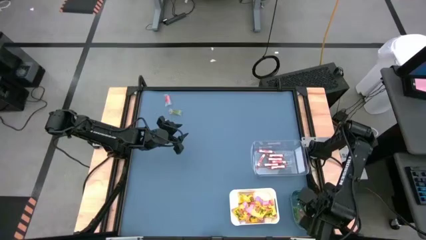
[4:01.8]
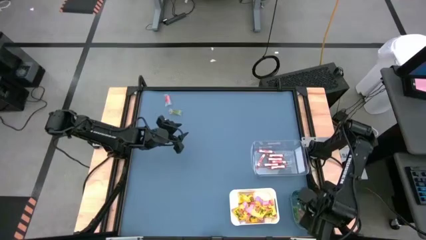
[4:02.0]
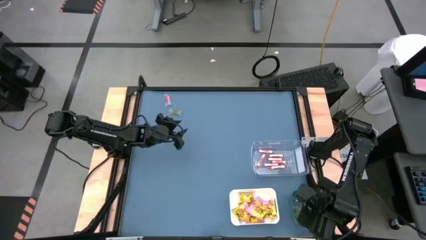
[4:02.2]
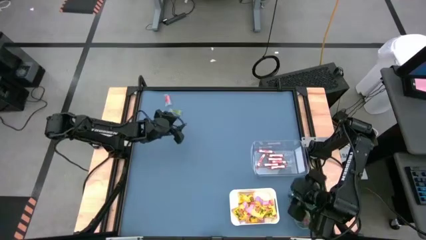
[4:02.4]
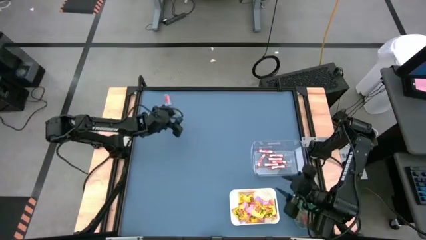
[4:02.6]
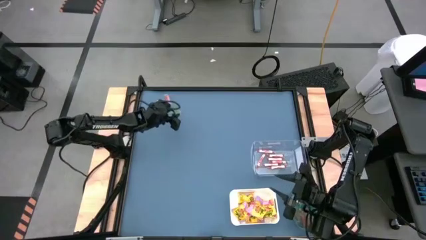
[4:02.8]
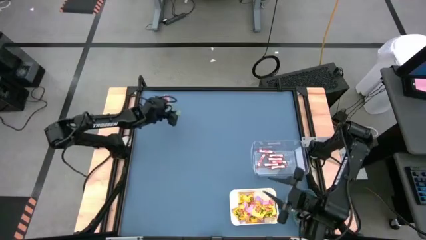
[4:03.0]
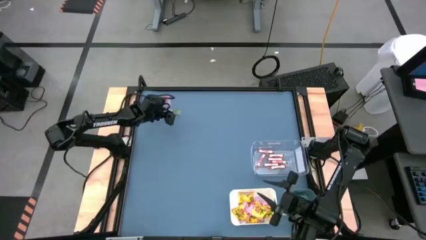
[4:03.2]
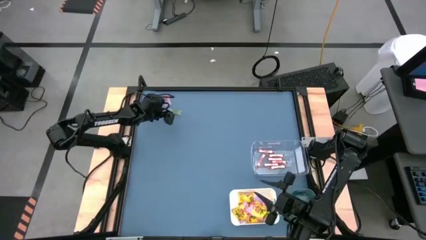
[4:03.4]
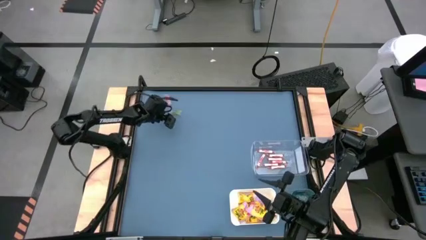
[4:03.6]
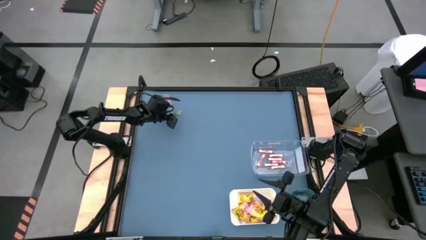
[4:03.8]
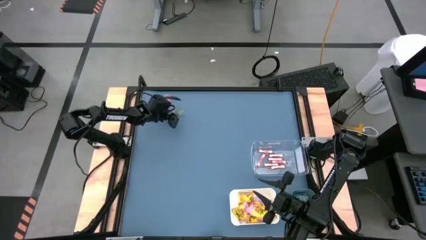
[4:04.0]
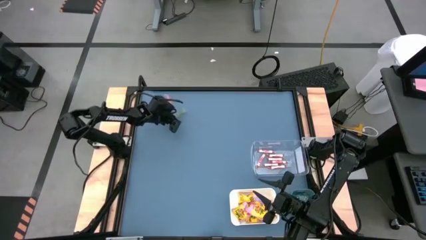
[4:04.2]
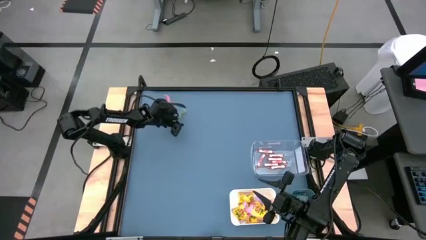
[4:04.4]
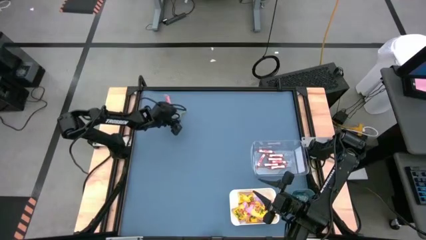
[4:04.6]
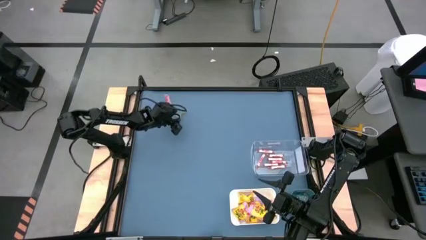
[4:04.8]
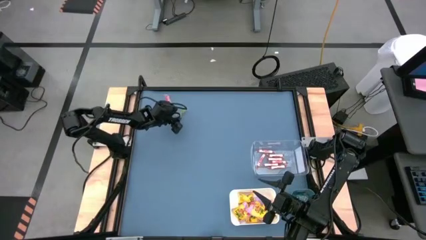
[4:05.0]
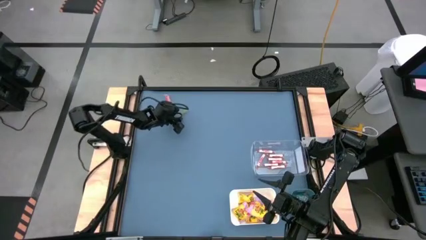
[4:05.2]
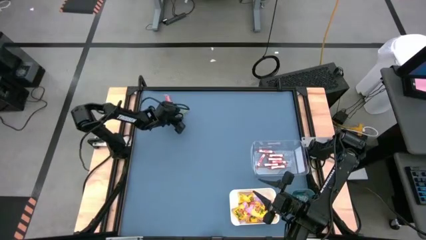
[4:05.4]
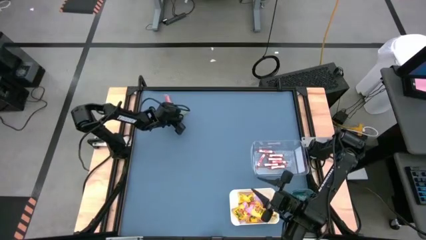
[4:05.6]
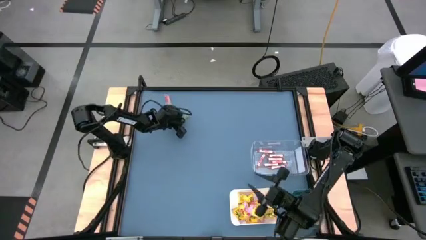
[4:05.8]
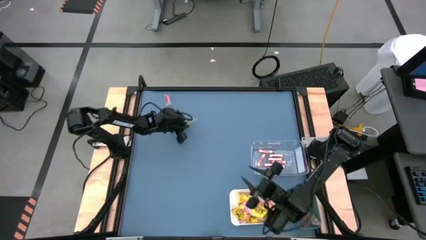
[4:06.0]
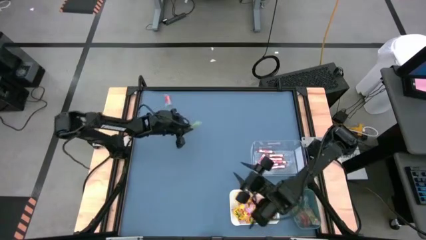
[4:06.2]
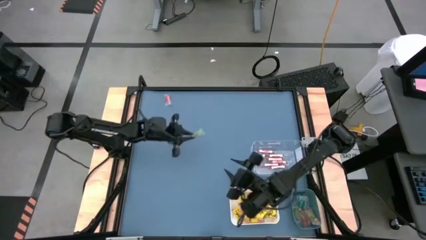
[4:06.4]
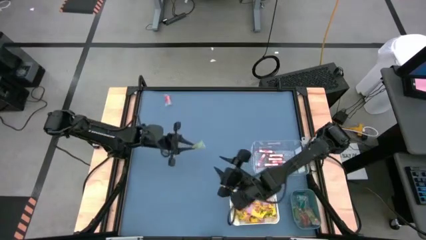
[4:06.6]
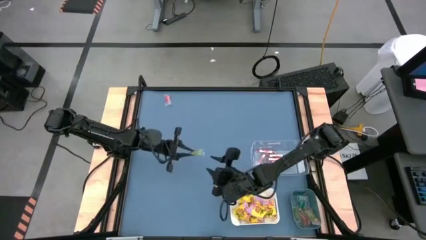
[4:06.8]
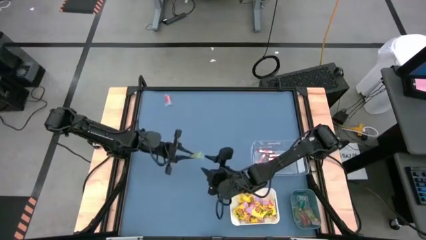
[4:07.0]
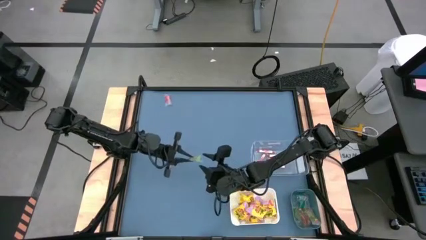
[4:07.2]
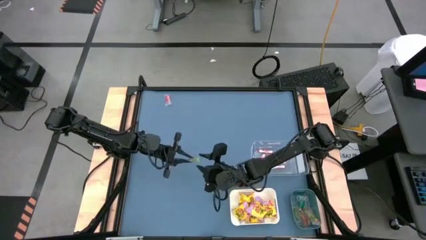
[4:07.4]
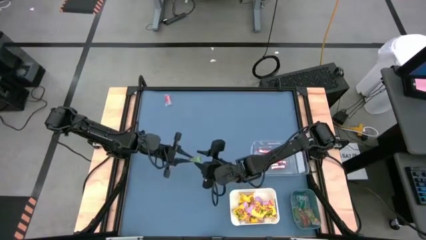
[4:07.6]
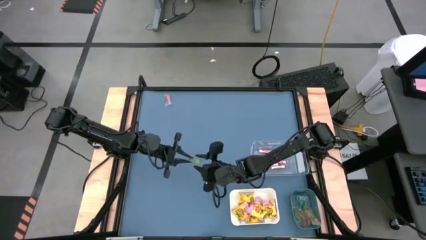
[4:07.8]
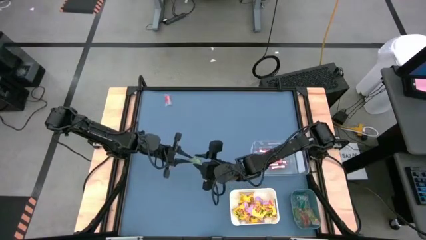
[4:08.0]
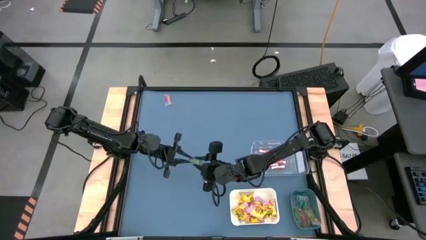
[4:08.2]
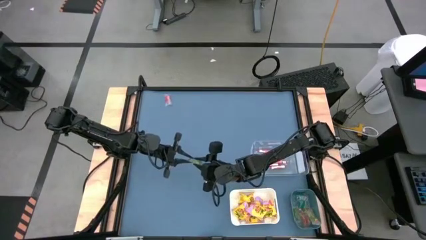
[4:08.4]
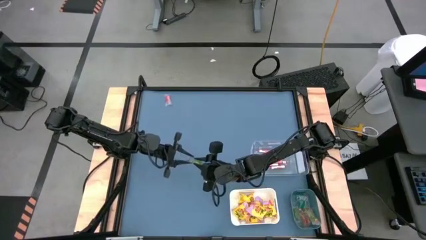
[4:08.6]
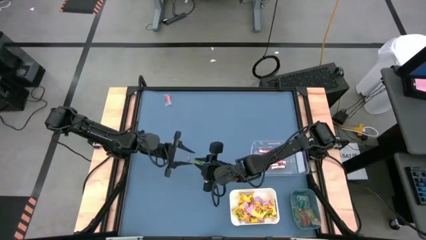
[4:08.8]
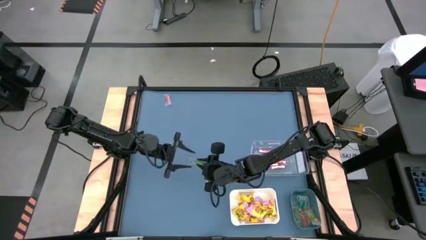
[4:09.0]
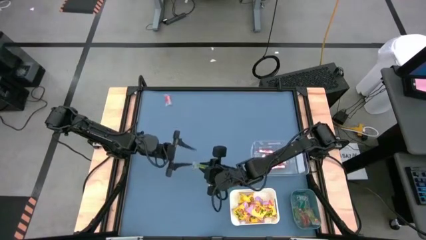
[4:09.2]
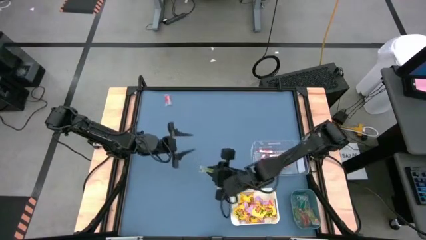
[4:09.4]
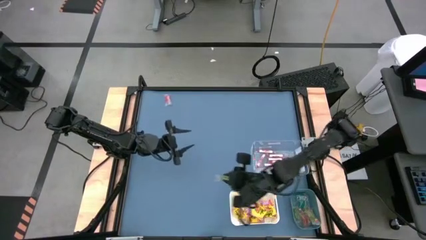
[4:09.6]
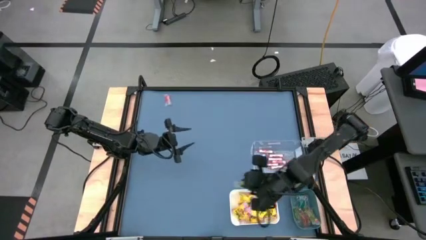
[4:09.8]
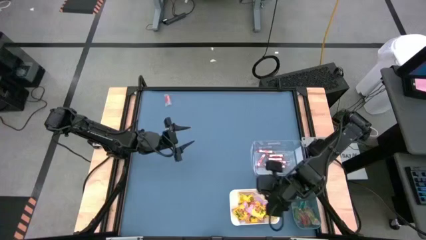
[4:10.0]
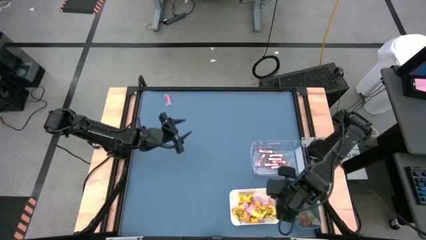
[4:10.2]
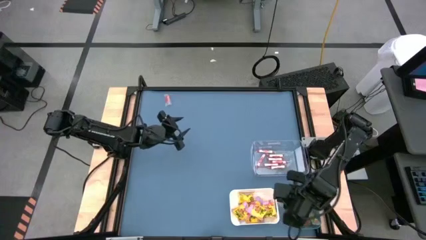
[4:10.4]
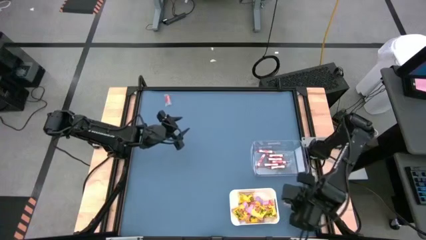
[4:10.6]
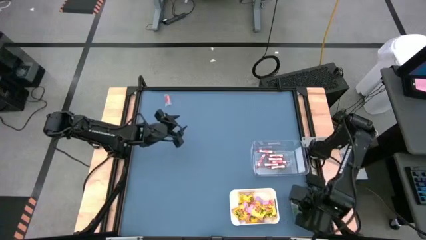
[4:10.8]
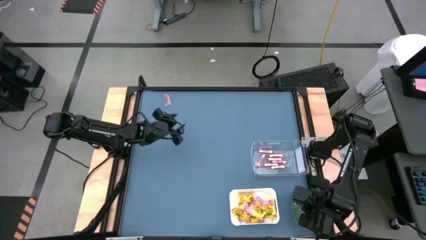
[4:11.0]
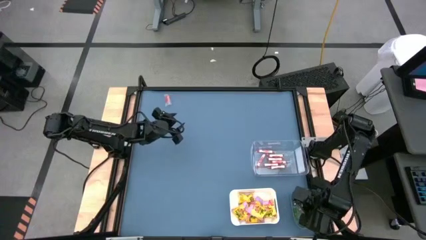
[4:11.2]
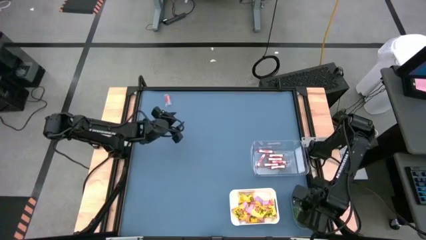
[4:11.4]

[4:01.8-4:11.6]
Task: Sort candy
Put the green gummy into the blue bin

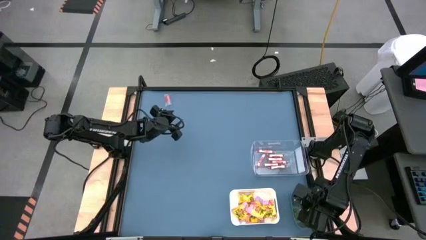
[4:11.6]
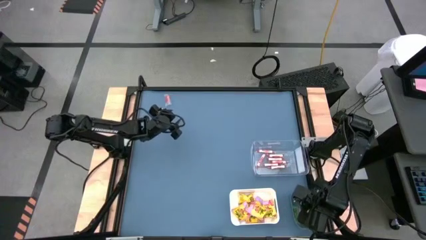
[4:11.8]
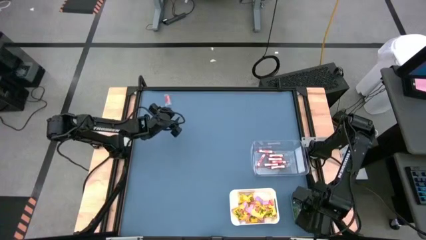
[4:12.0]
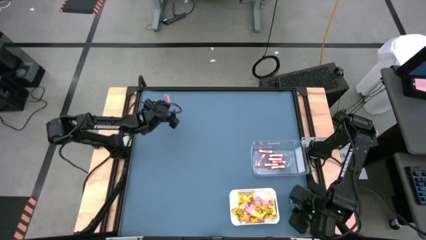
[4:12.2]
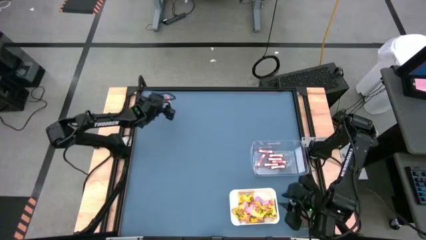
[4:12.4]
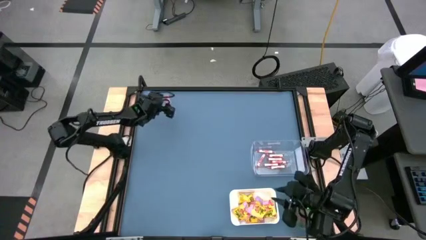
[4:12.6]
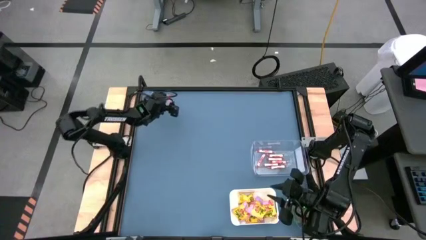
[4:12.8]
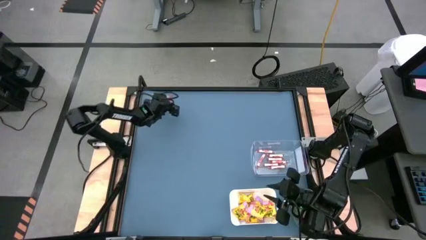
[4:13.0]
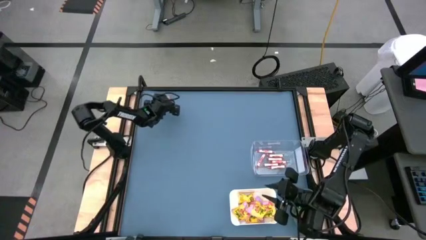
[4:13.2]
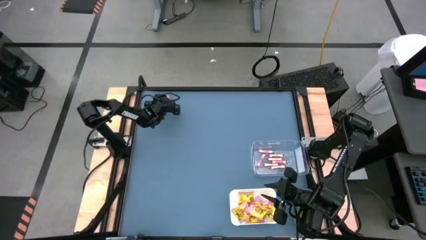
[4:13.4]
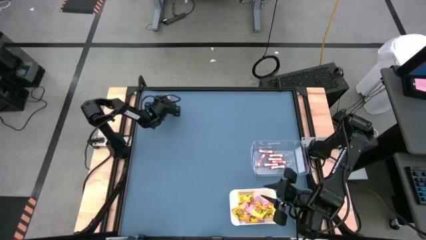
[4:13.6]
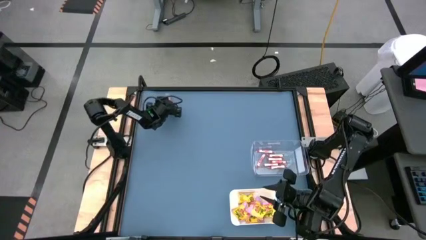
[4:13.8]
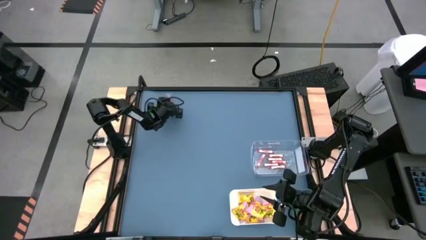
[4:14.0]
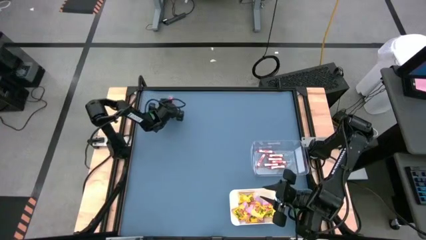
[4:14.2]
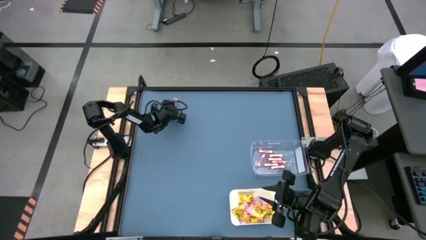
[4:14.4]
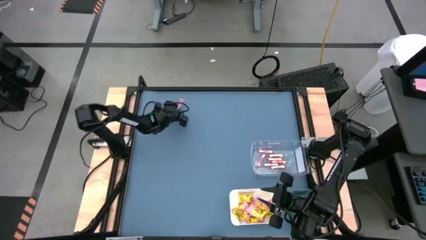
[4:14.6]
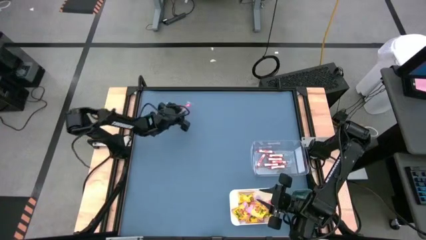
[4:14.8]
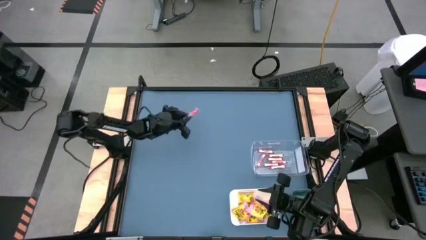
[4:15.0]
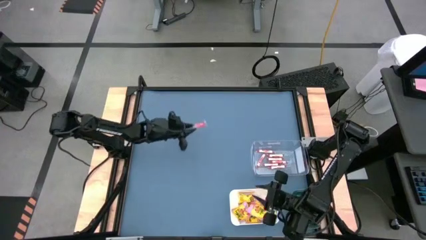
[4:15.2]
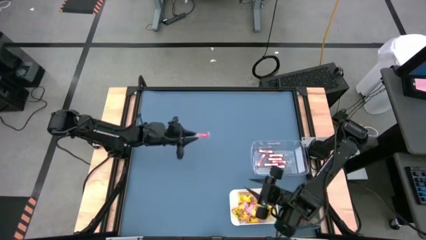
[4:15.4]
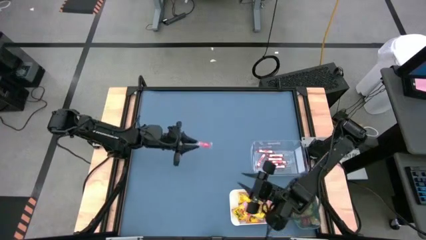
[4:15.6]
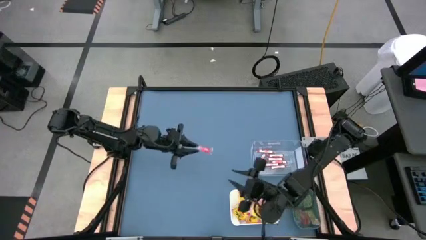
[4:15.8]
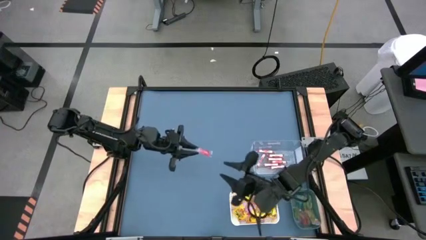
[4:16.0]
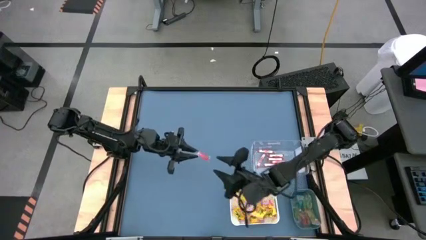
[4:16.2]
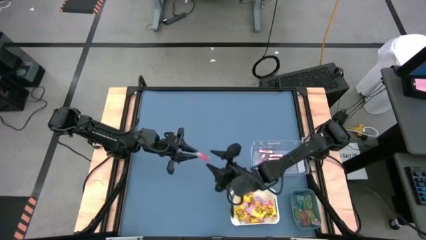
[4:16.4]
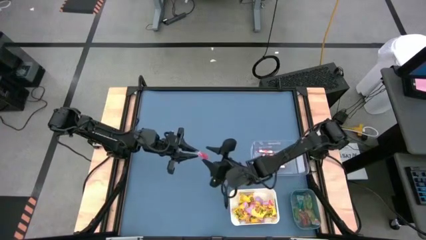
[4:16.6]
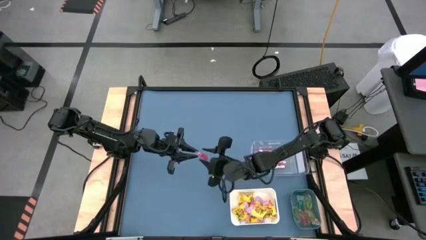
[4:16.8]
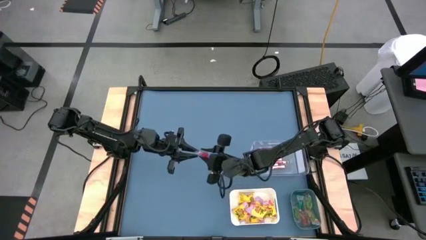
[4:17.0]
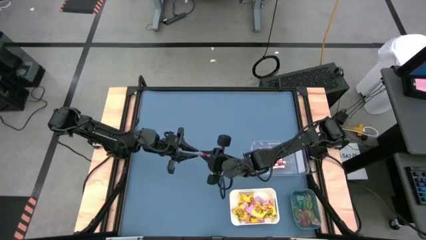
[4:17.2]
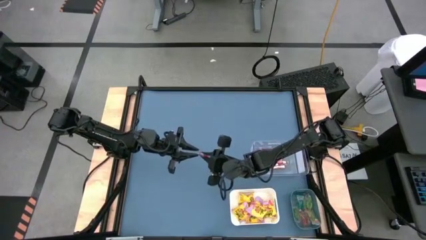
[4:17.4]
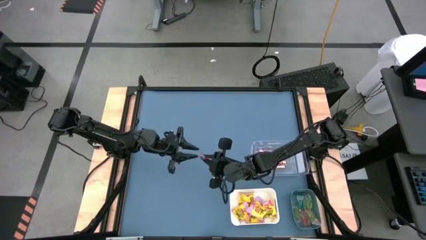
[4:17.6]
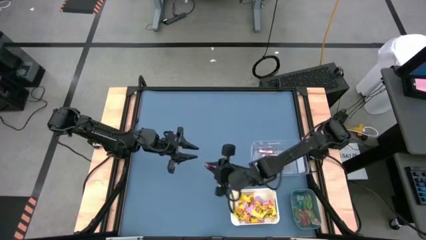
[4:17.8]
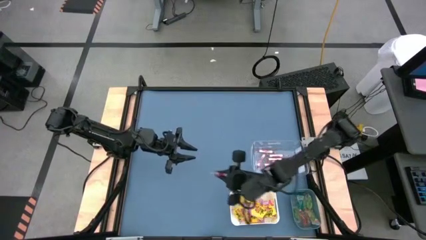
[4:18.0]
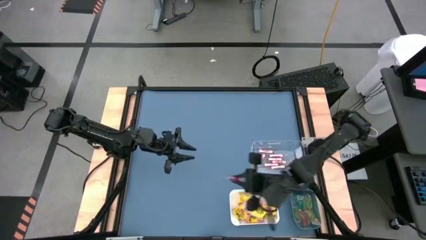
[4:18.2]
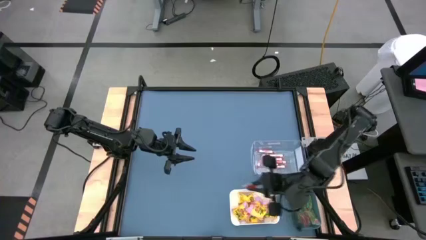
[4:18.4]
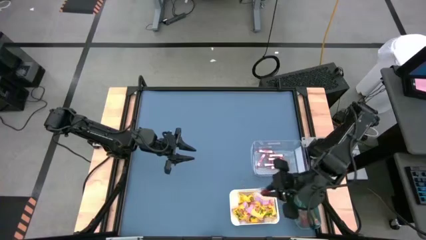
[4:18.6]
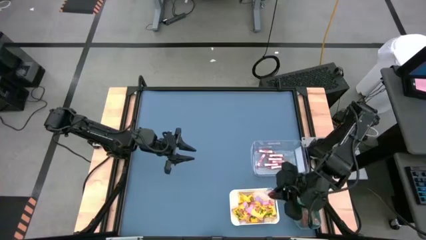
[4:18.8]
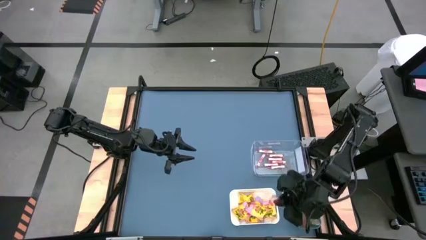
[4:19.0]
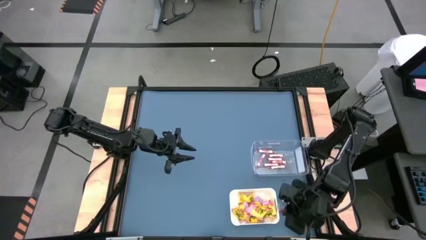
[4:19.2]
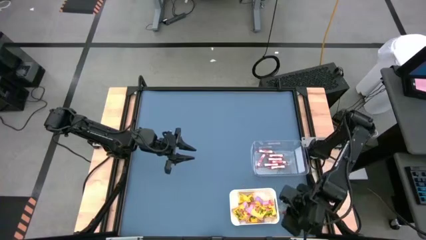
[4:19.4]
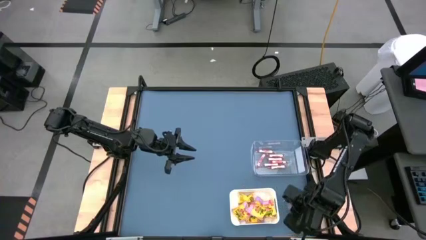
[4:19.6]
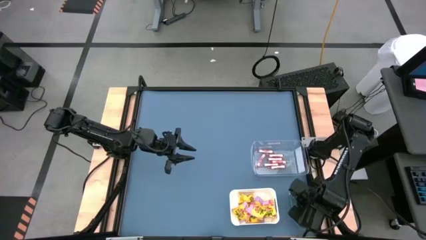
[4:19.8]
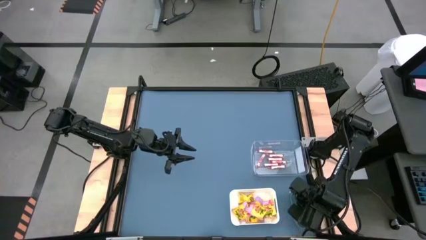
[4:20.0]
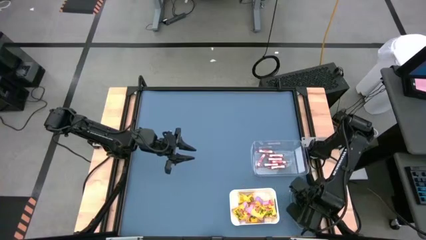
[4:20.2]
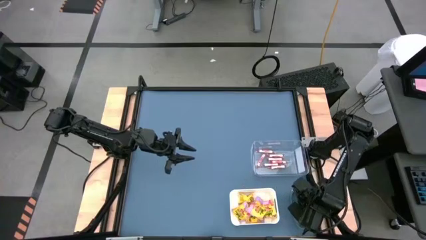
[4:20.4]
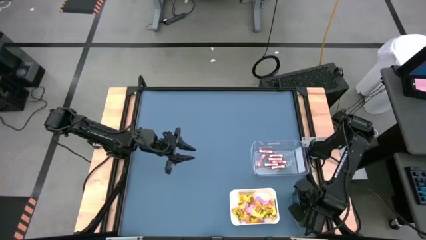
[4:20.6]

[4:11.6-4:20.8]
Put the red gummy into the blue bin
